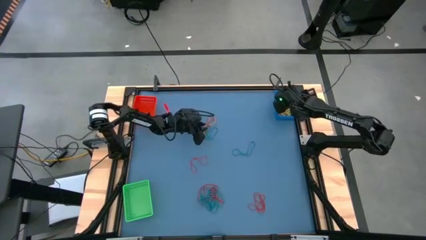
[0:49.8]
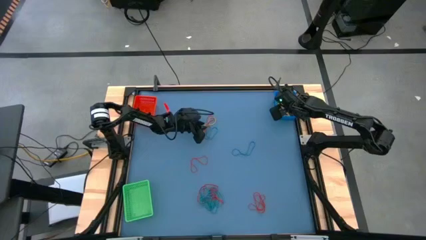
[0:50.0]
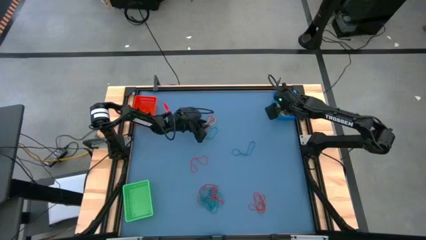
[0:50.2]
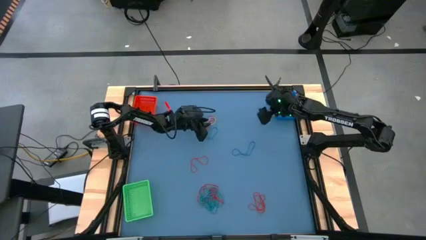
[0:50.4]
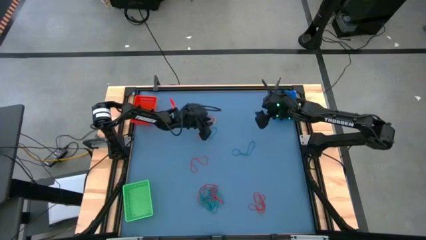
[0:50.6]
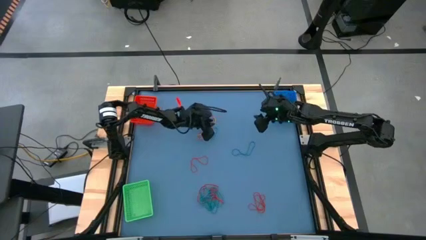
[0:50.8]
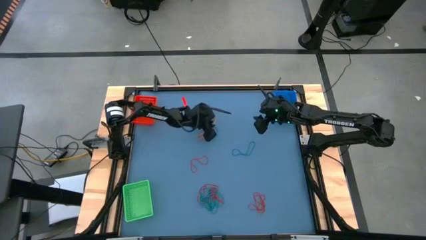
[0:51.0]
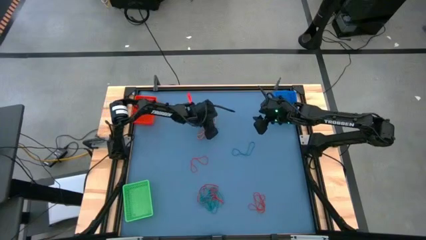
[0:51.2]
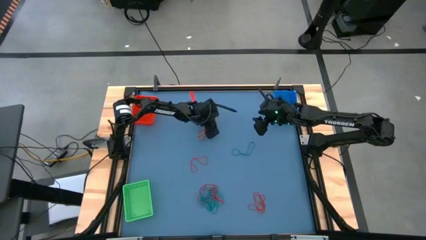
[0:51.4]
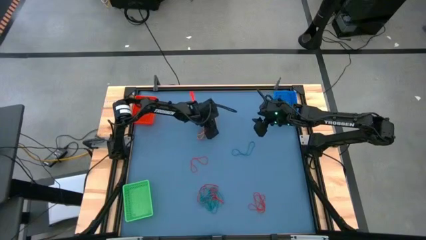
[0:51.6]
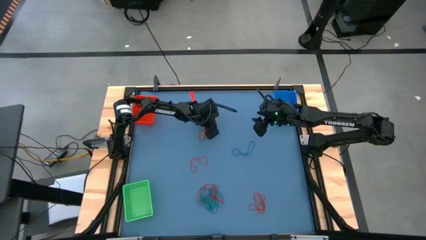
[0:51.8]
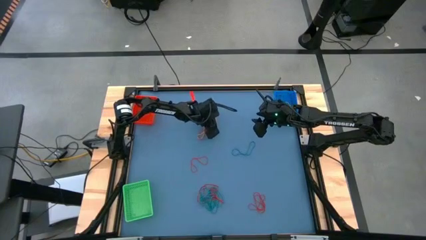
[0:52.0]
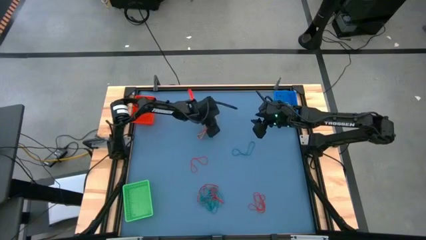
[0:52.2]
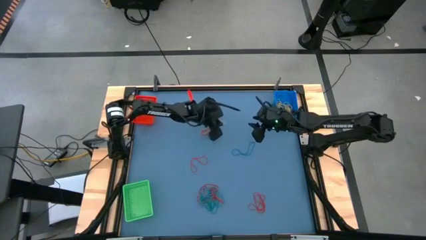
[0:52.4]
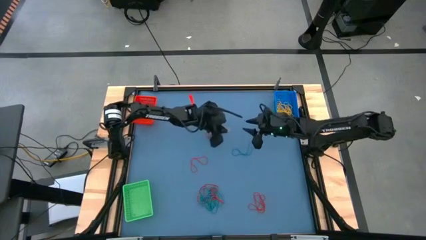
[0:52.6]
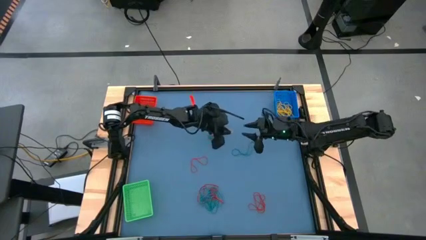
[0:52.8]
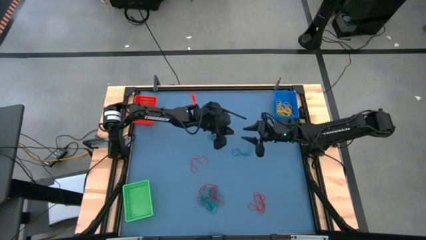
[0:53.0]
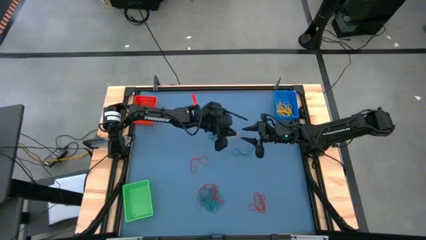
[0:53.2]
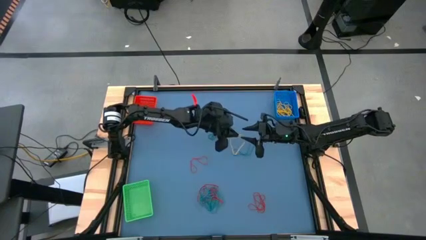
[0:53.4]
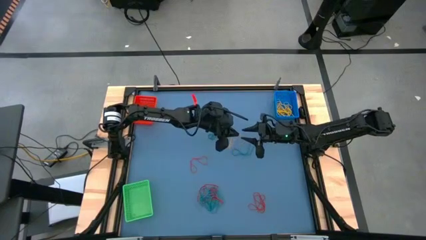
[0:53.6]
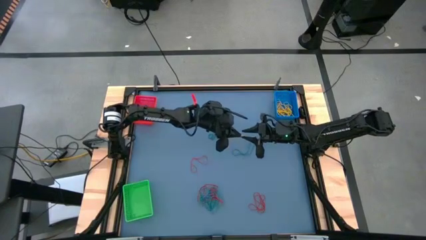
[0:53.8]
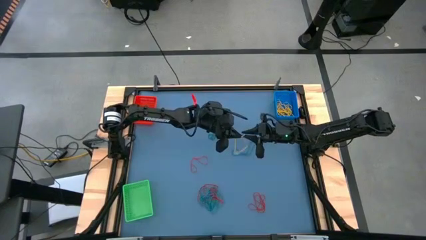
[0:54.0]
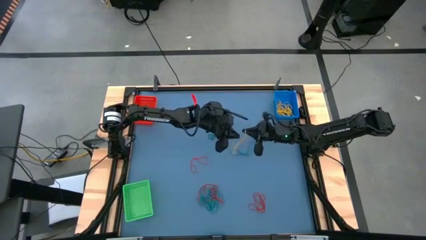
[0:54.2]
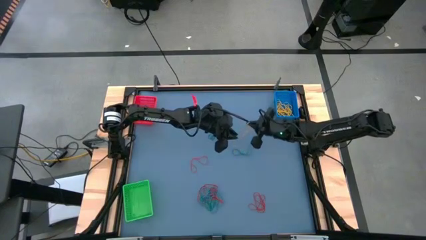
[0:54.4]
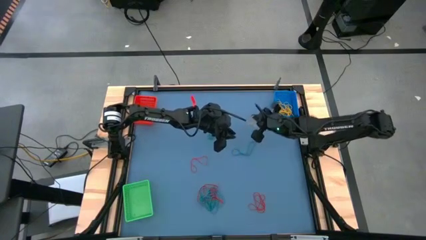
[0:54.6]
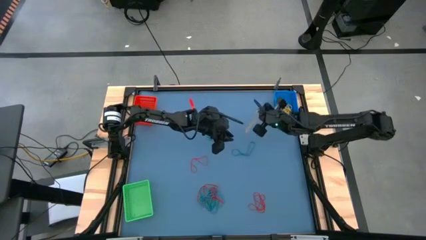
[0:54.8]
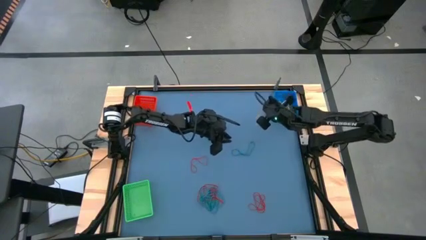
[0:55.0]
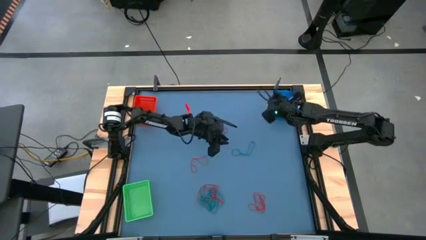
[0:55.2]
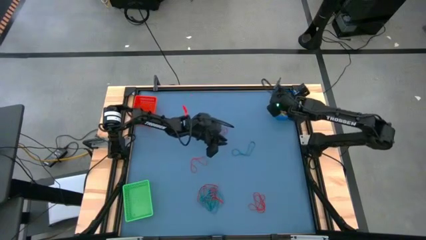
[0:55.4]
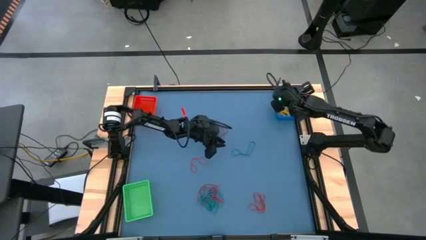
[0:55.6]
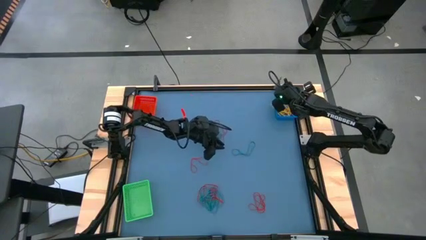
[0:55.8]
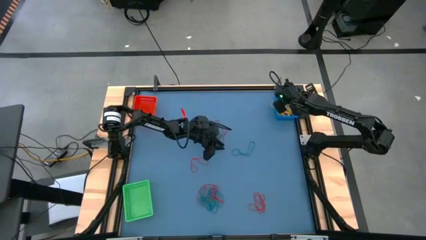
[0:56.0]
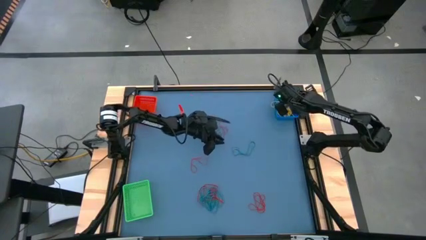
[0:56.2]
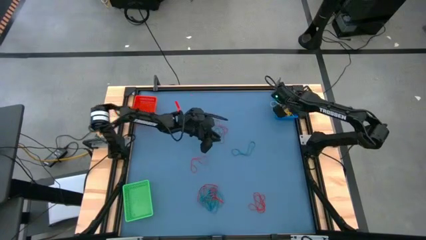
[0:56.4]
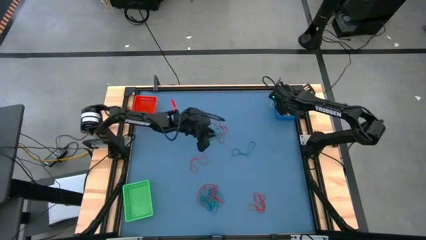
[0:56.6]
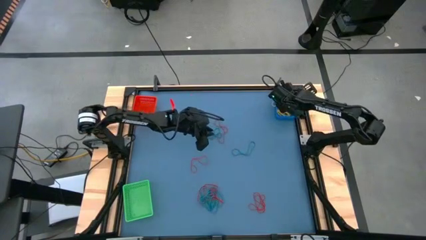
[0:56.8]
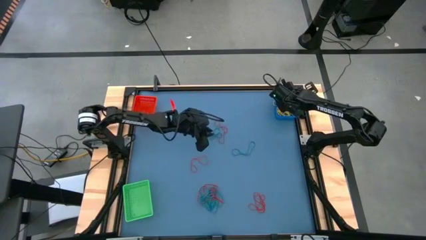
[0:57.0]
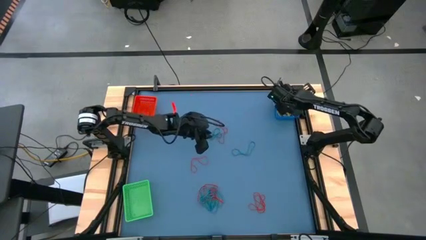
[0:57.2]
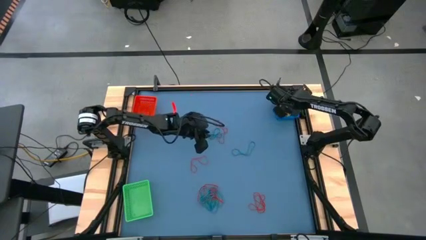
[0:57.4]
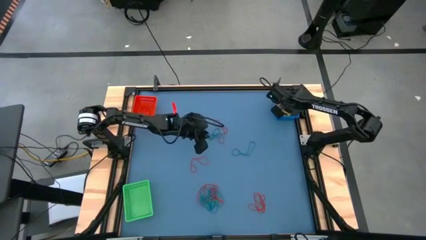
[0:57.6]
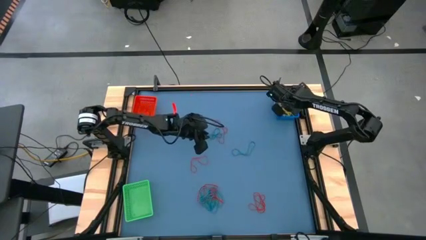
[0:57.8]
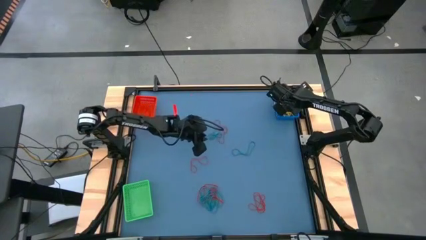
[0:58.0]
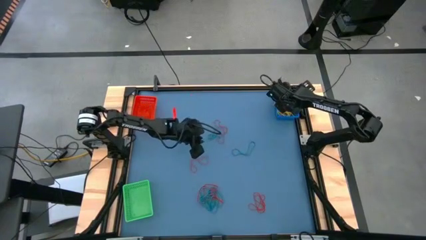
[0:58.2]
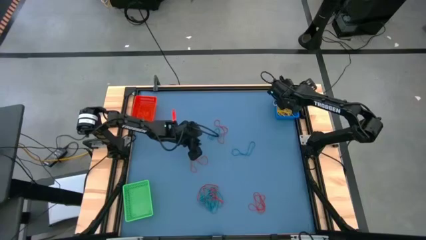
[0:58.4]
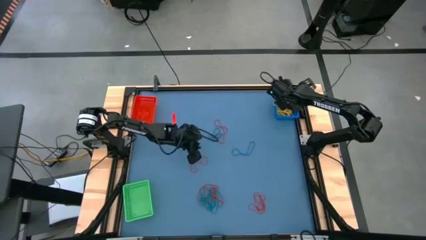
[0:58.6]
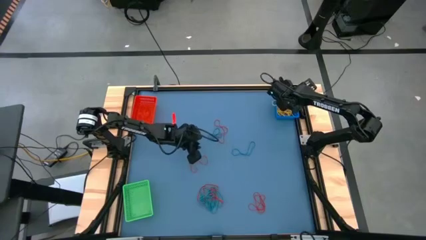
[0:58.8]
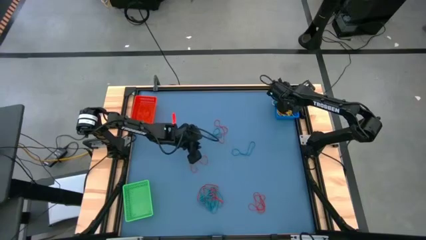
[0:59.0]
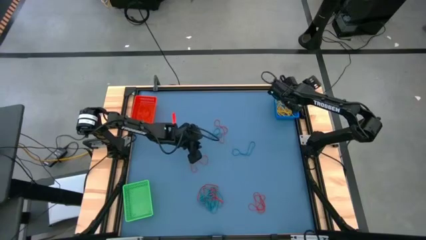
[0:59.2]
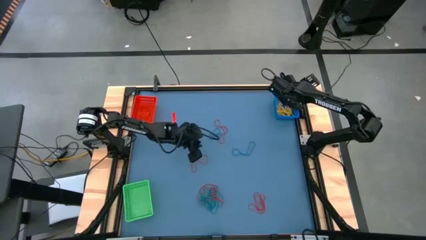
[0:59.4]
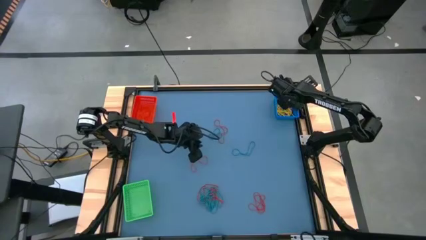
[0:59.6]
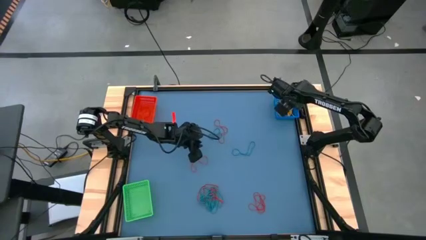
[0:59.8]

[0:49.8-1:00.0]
Task: Sort rubber bands into baskets
Put the yellow rubber band into the blue basket

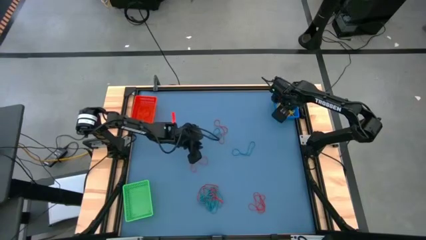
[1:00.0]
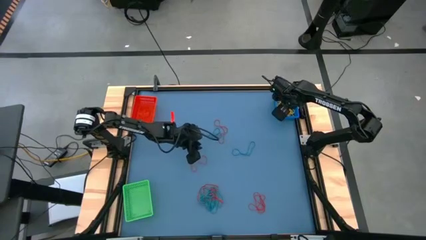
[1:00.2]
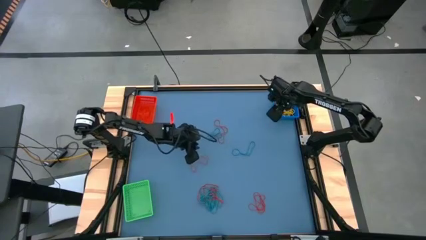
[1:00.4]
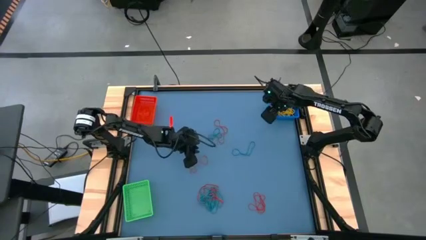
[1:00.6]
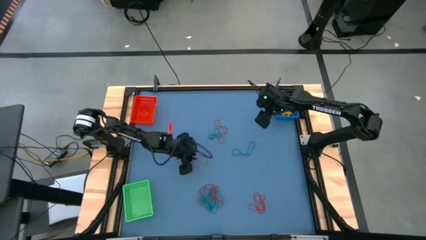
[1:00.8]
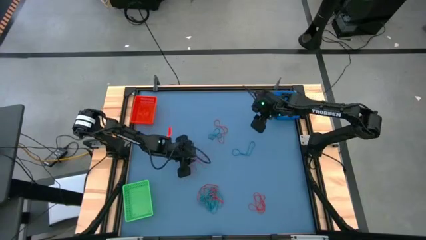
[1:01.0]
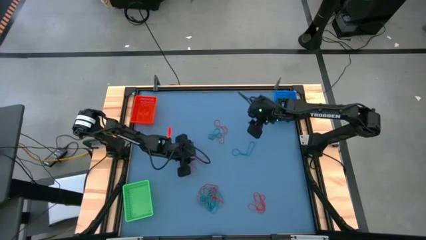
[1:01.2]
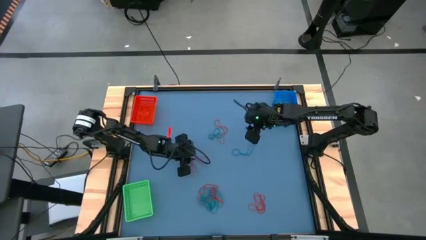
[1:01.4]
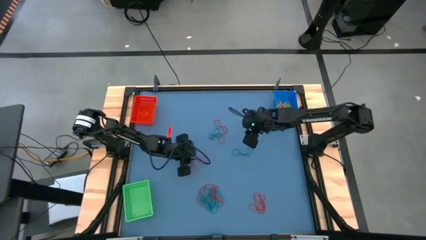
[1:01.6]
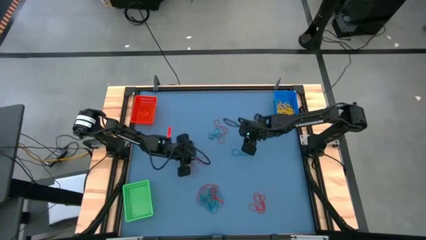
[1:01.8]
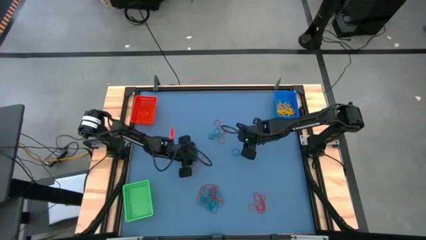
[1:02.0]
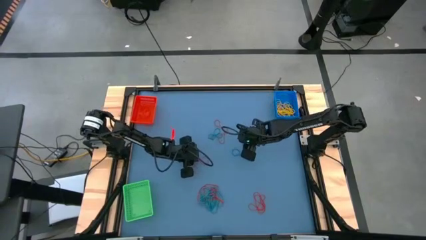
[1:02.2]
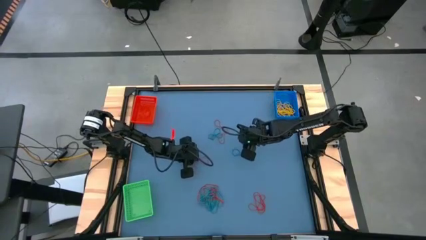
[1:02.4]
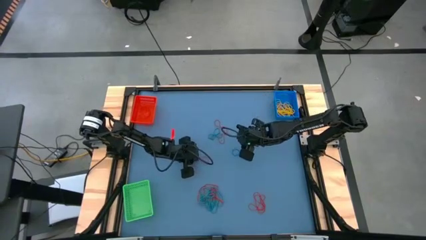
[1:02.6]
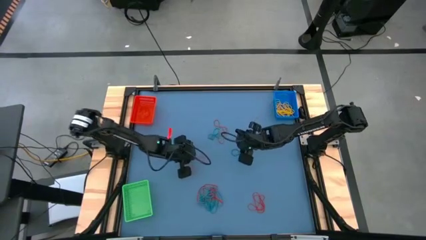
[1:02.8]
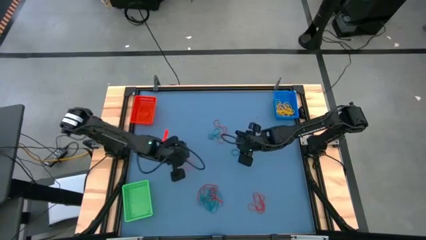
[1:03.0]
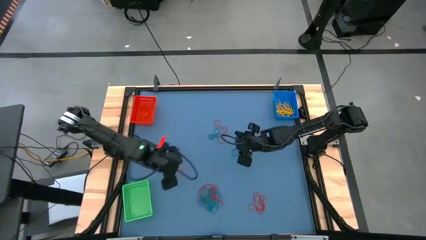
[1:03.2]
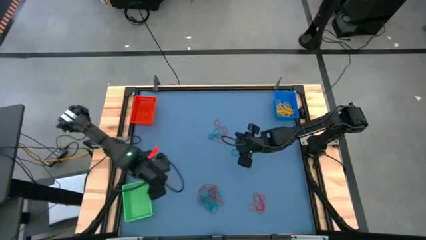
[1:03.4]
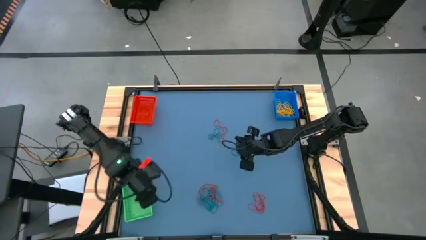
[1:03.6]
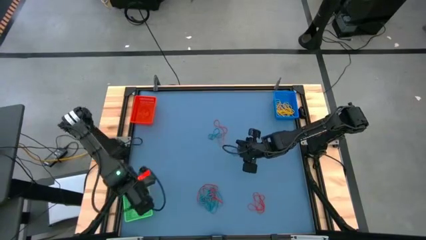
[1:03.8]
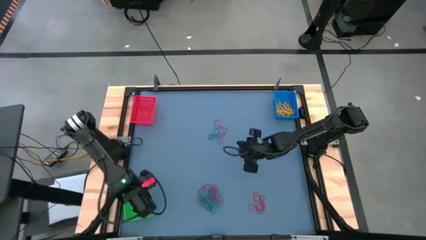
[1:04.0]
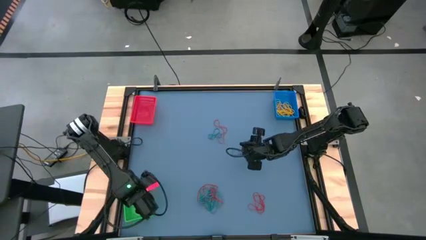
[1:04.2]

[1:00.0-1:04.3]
Put the red rubber band into the green basket
